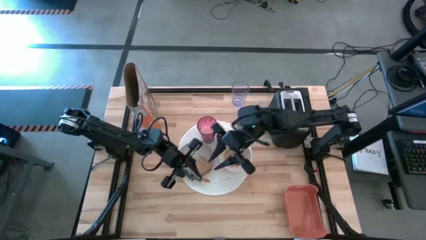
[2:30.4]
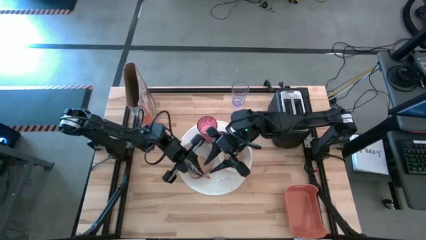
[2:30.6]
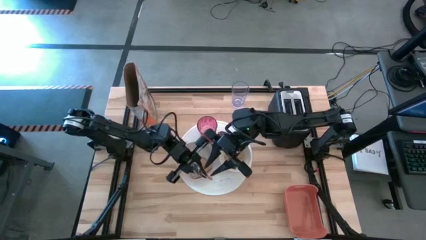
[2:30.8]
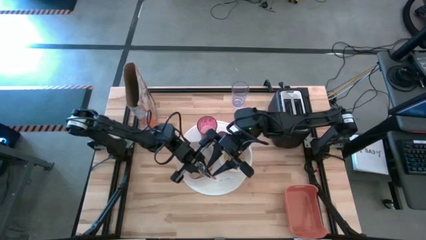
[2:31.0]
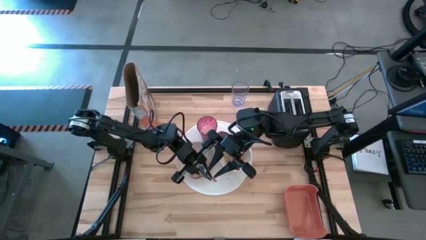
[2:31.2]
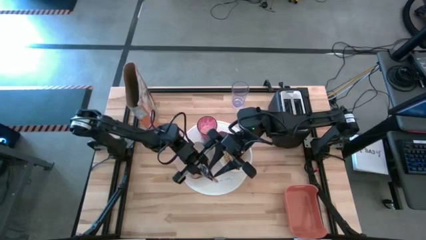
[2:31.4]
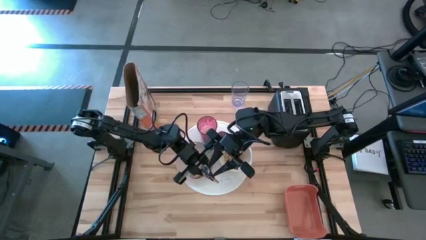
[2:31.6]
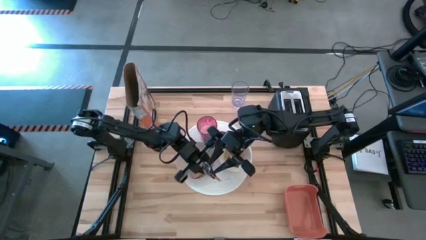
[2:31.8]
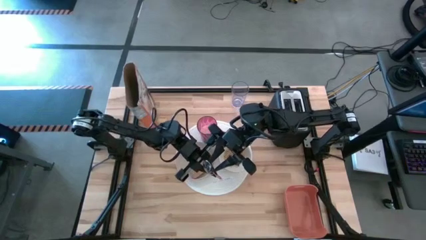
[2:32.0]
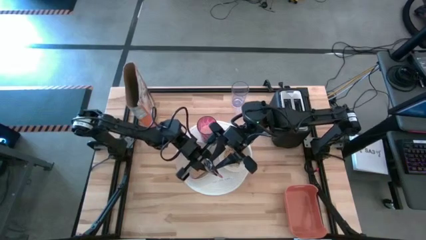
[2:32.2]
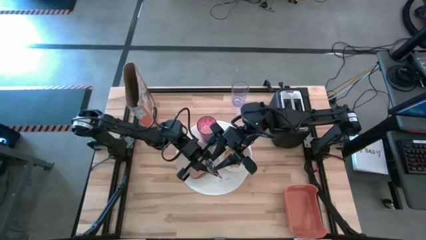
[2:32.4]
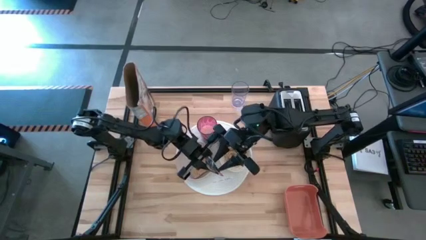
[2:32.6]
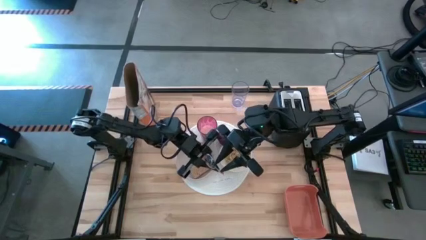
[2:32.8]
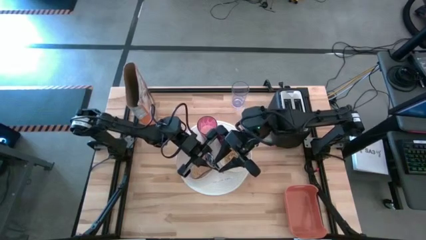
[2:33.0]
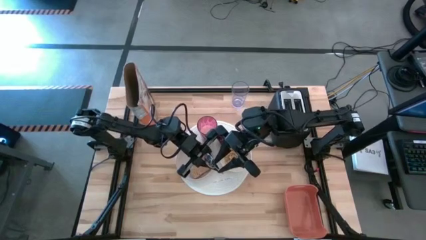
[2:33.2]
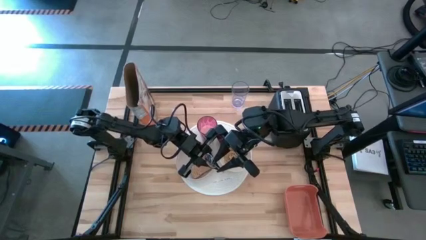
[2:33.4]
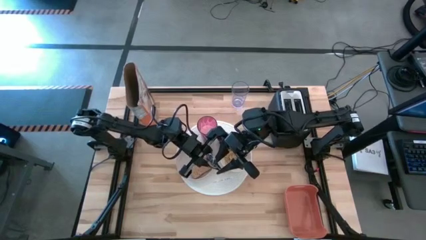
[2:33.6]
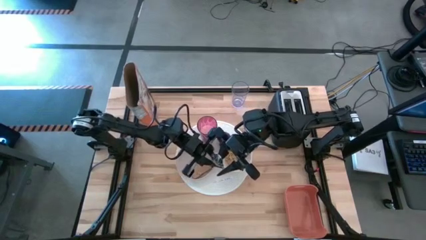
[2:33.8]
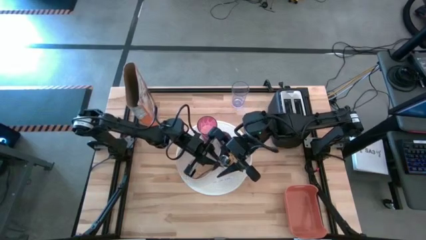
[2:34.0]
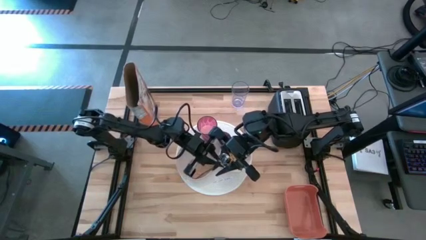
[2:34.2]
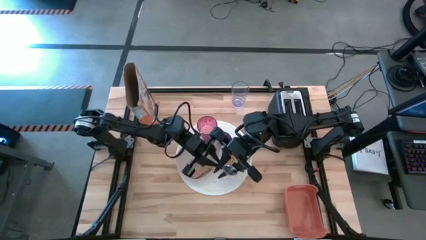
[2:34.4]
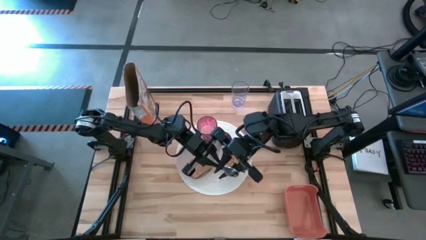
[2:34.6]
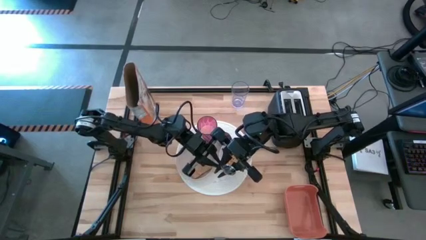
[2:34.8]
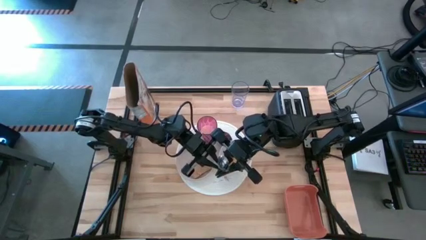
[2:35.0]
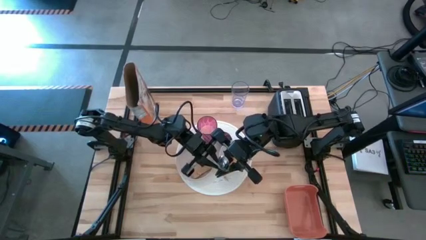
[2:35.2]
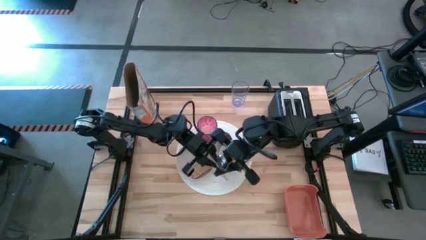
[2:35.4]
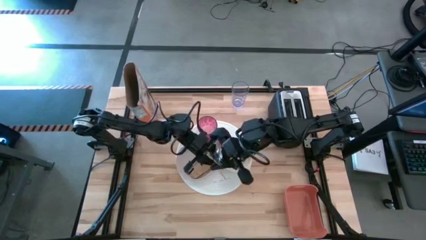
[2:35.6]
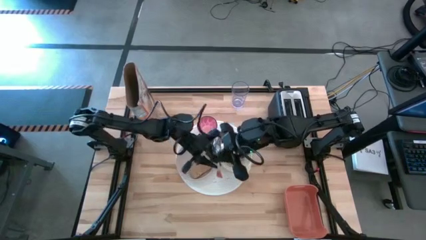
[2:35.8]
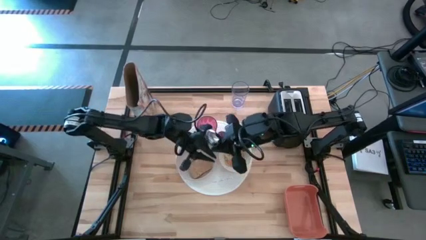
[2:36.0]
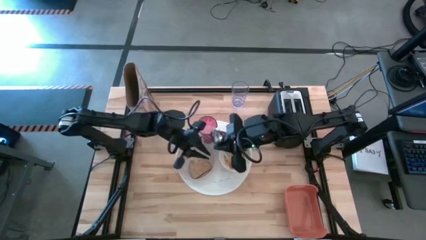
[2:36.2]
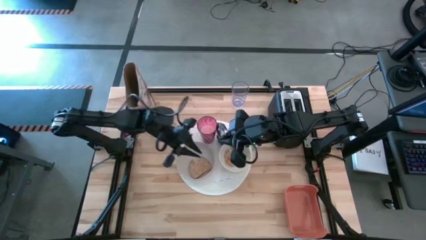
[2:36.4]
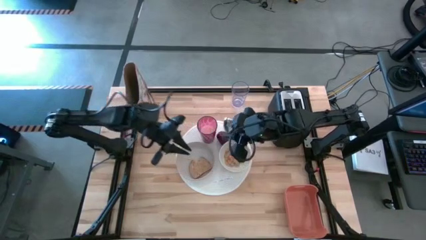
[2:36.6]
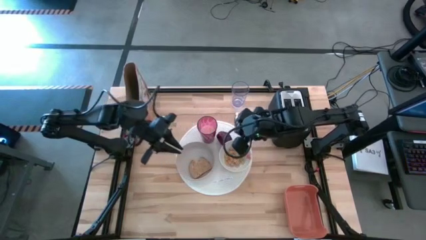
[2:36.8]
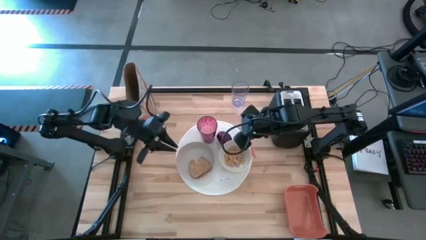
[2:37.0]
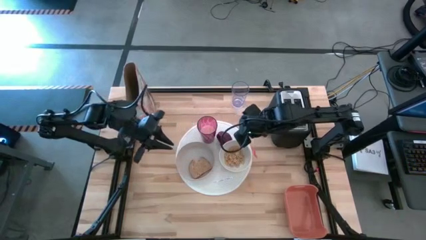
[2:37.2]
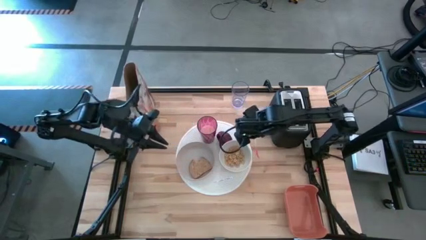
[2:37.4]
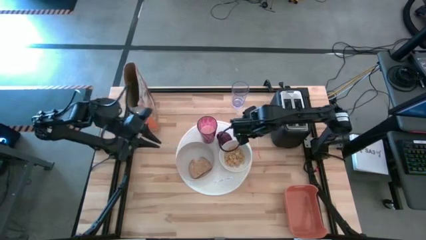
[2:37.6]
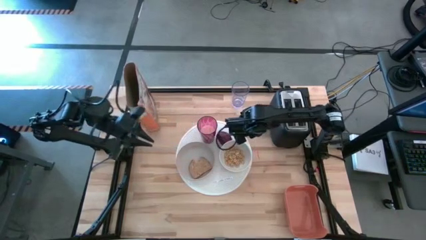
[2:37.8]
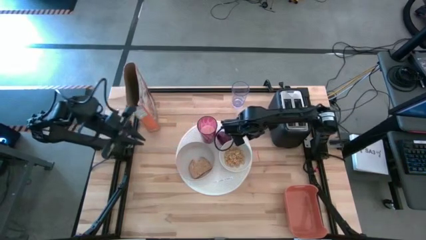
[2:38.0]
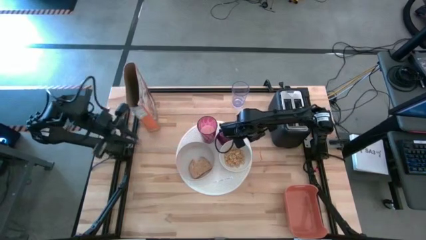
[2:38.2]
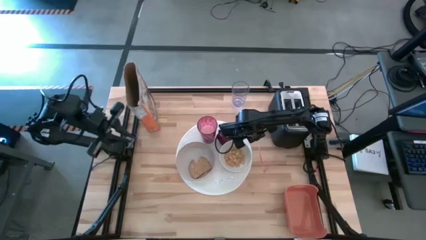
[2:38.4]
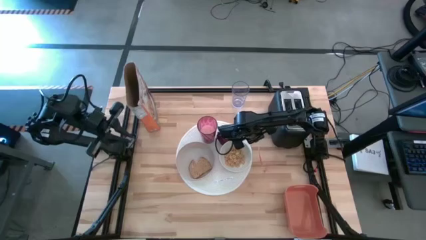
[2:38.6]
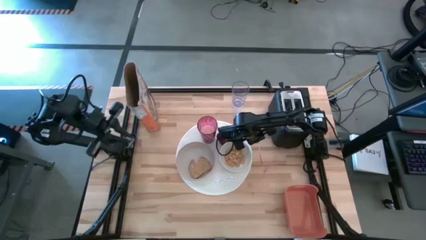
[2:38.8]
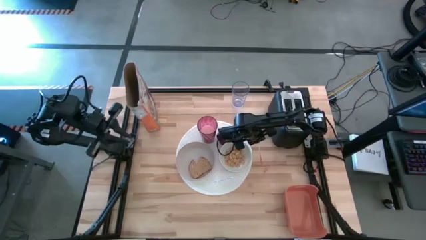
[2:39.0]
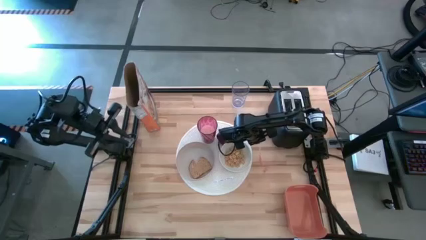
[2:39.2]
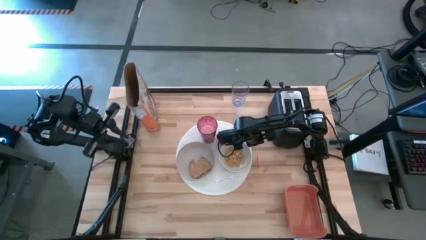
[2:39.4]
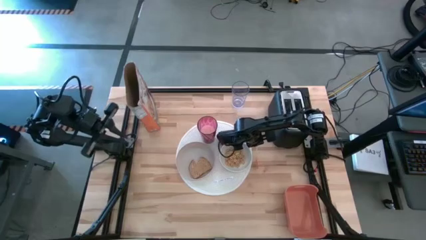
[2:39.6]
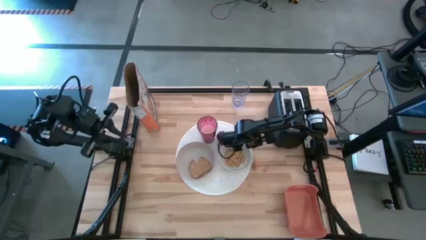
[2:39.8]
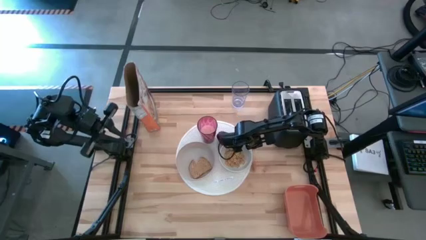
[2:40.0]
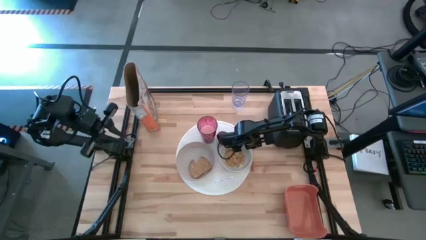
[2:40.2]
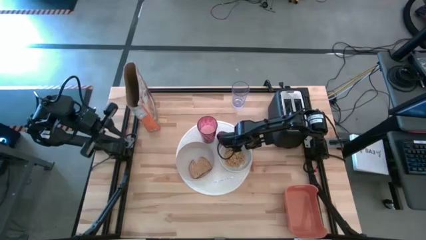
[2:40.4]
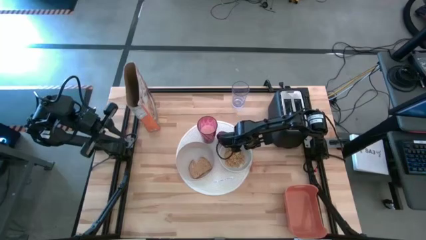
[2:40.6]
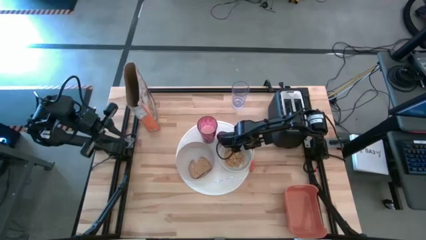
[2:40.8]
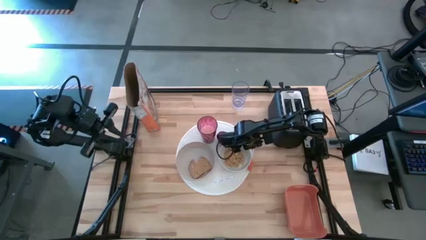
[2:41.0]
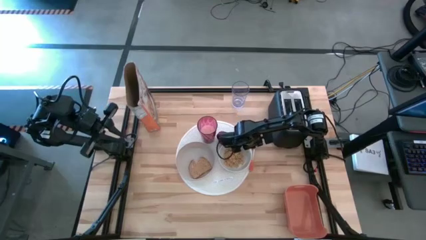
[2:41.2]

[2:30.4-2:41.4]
Task: Arrange a breakfast setting
Put the orange spoon on the table to the right side of the white bowl

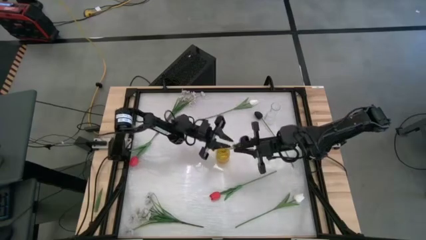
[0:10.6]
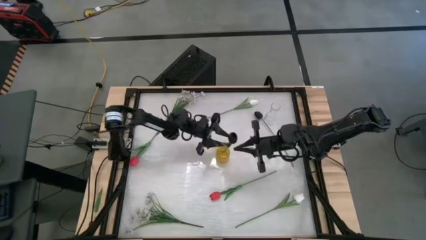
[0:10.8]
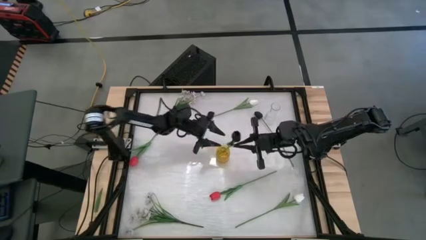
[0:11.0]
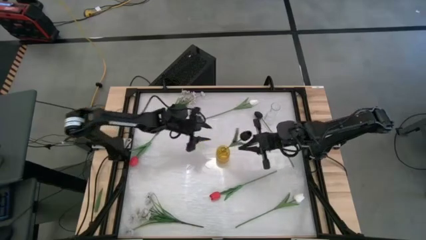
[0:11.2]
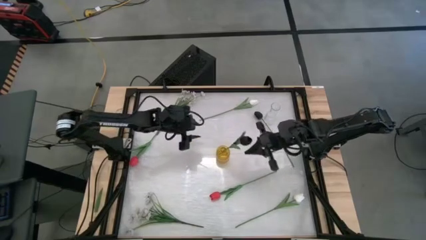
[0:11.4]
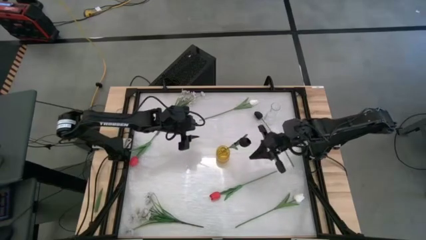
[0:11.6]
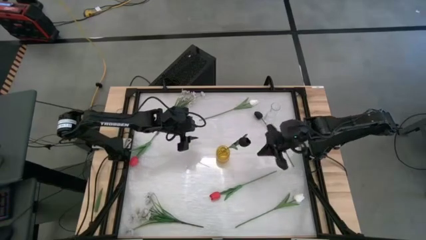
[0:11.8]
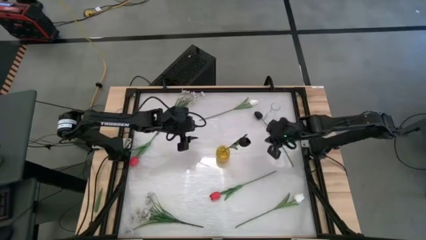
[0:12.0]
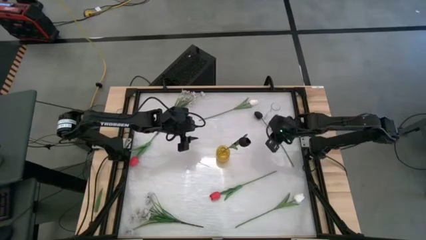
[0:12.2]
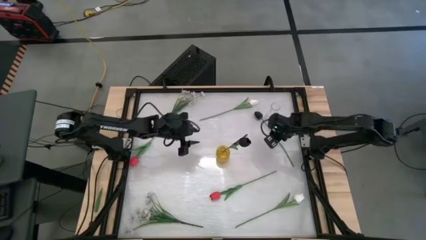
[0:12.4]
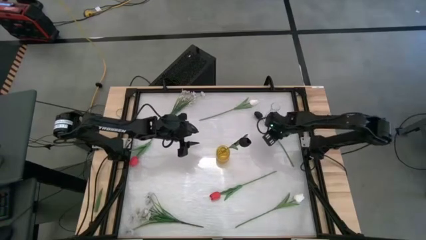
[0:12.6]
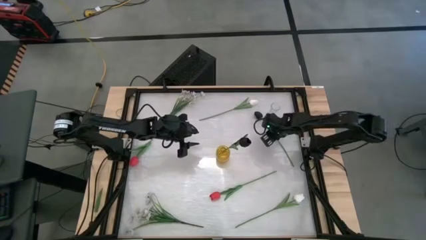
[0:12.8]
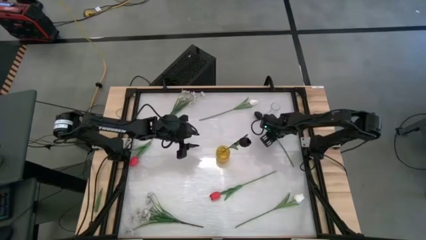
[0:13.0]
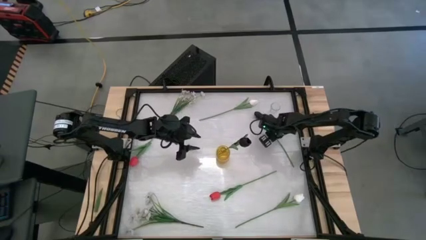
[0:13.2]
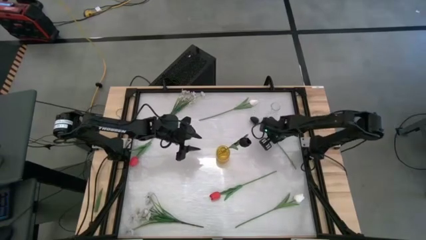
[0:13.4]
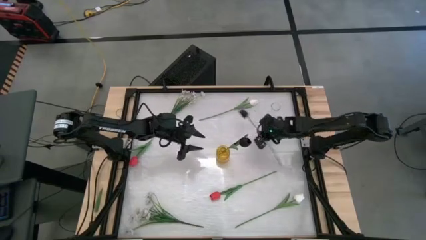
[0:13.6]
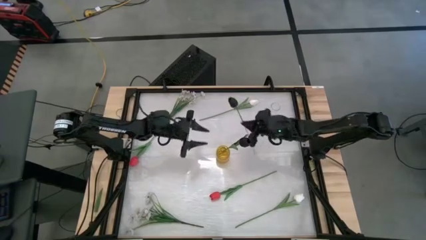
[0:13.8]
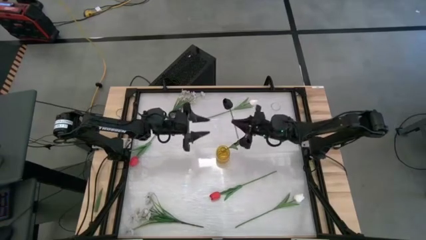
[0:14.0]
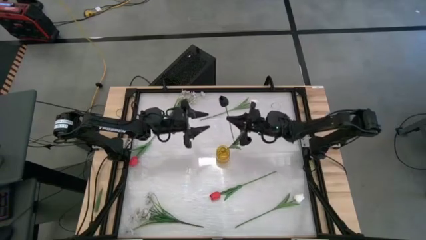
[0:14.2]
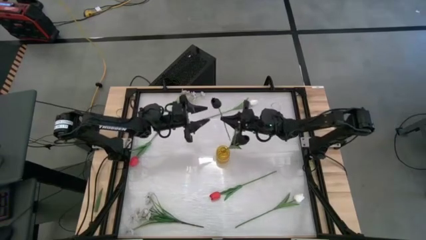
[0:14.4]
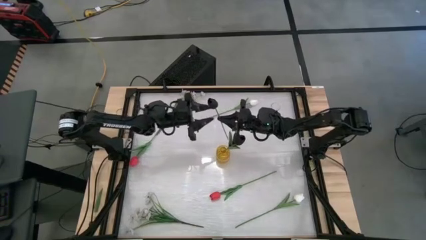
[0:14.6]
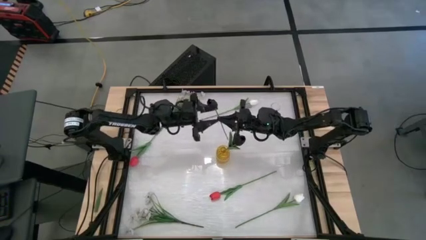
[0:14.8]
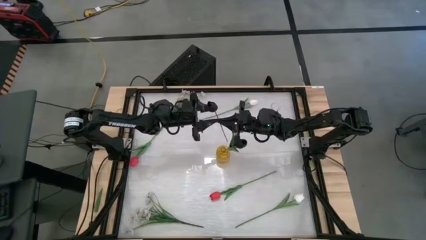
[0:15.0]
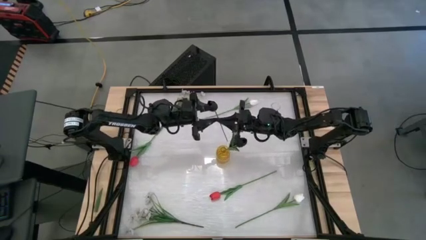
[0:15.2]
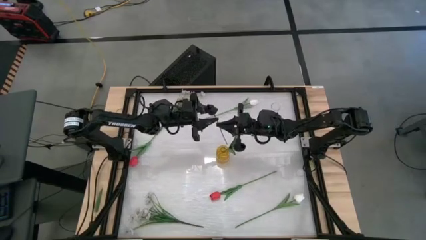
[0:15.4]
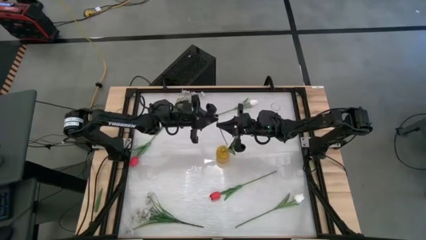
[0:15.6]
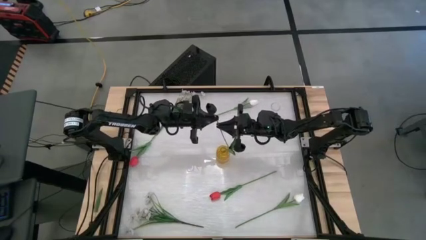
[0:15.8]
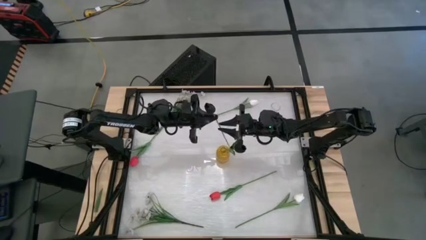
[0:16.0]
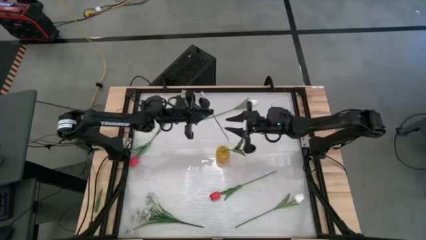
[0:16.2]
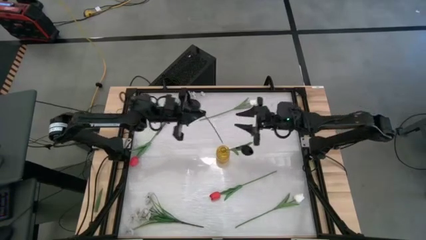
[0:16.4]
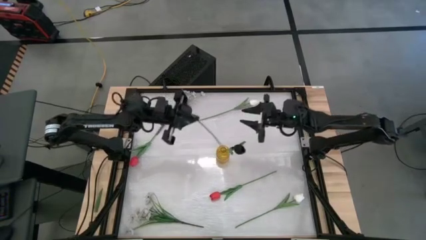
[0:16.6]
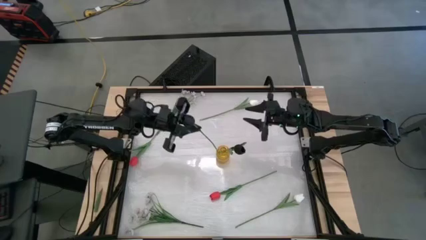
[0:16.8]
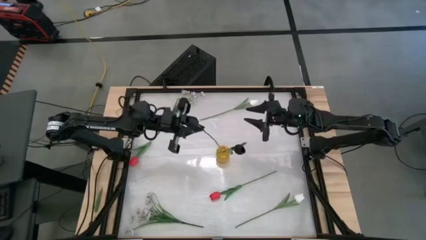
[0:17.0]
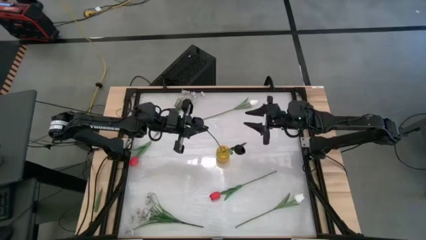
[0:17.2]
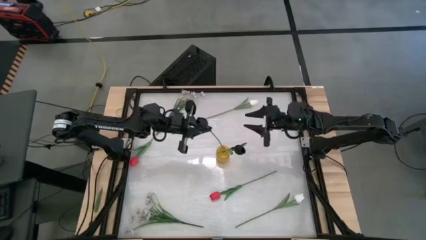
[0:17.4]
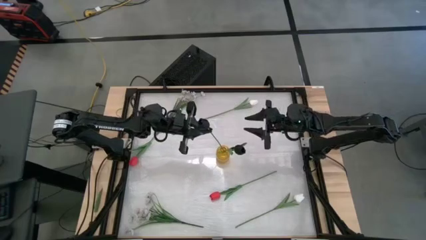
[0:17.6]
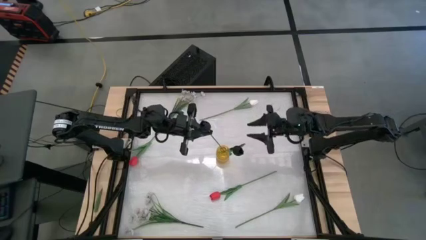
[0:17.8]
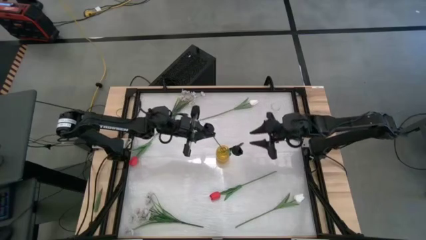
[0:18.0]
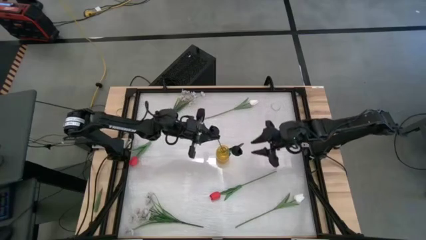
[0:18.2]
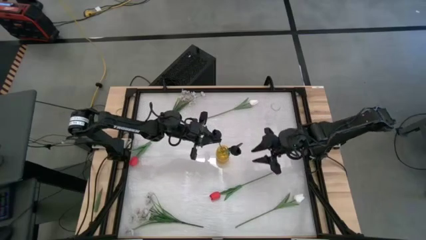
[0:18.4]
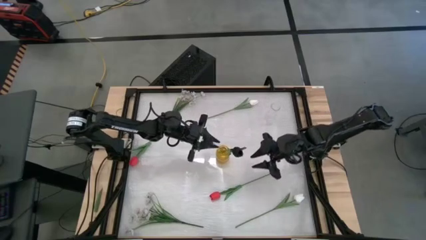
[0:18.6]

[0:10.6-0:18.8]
Task: Sort flowers into vase by color
Put the black tulip into the black vase
